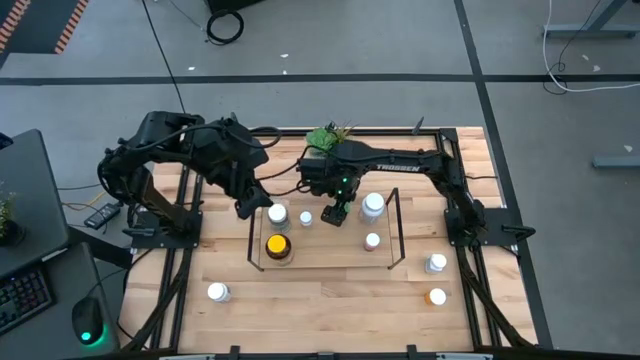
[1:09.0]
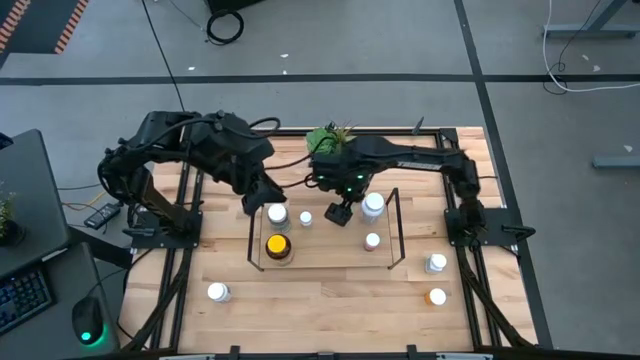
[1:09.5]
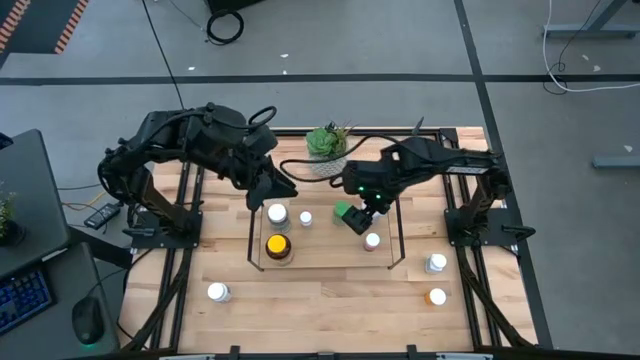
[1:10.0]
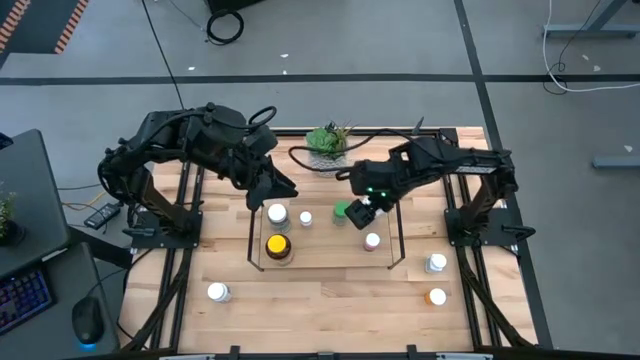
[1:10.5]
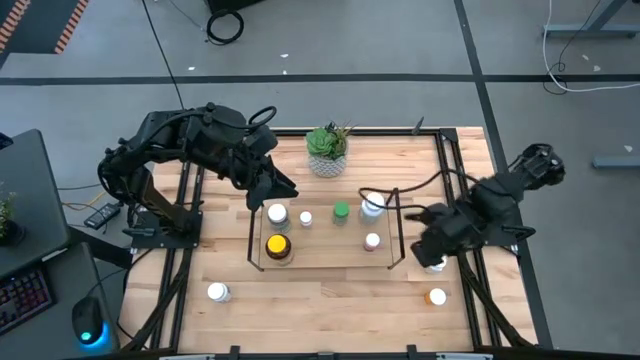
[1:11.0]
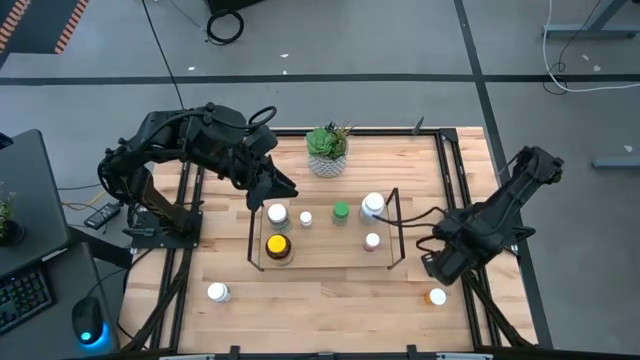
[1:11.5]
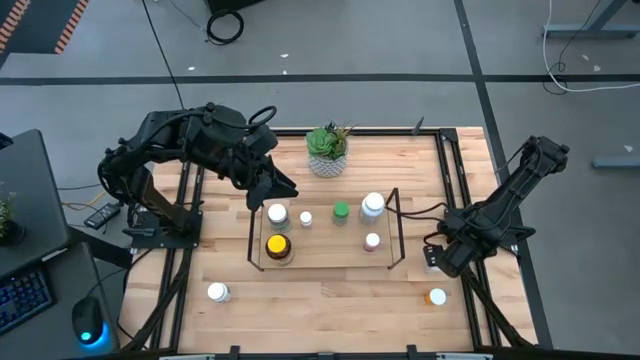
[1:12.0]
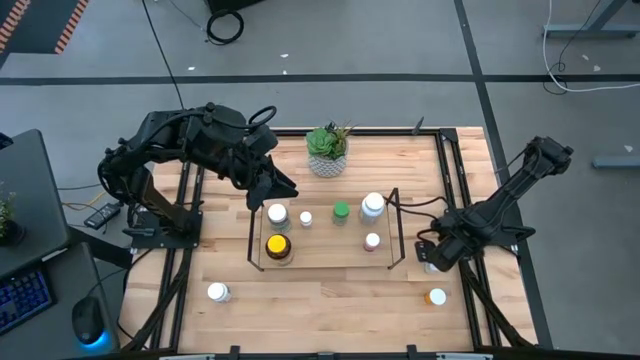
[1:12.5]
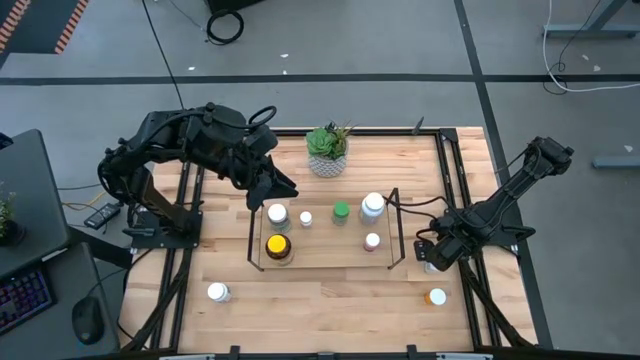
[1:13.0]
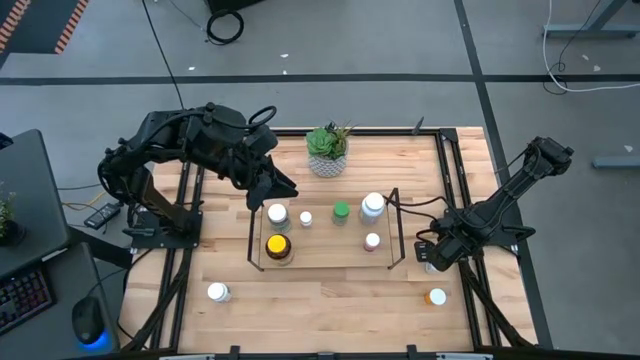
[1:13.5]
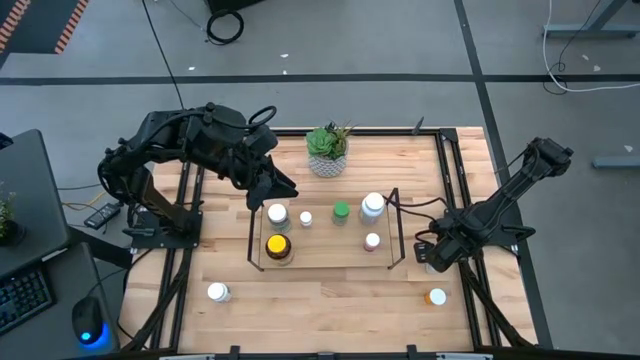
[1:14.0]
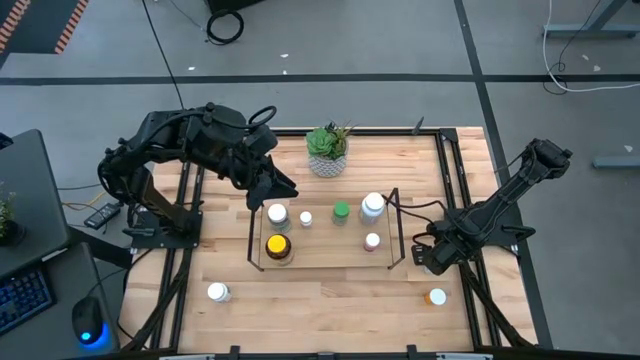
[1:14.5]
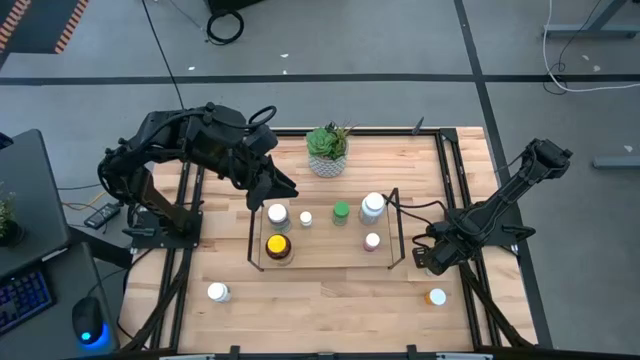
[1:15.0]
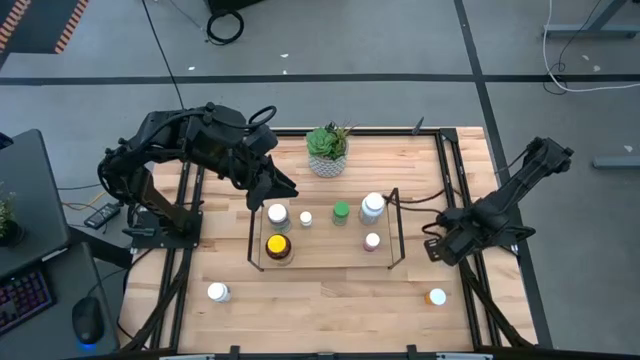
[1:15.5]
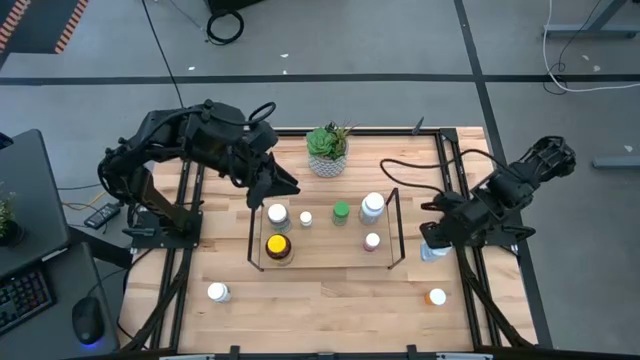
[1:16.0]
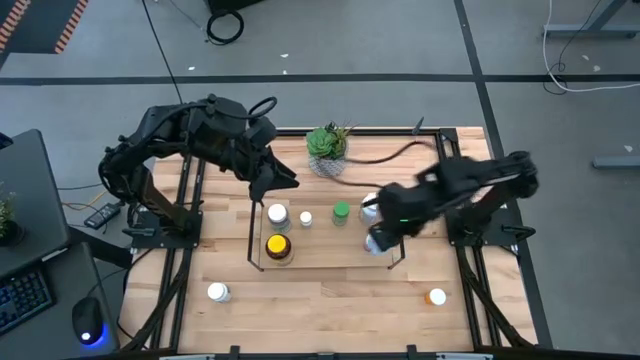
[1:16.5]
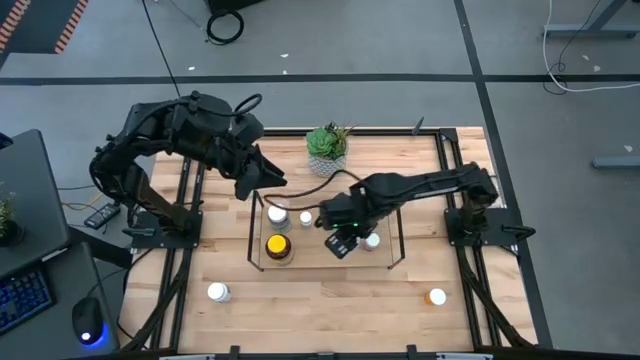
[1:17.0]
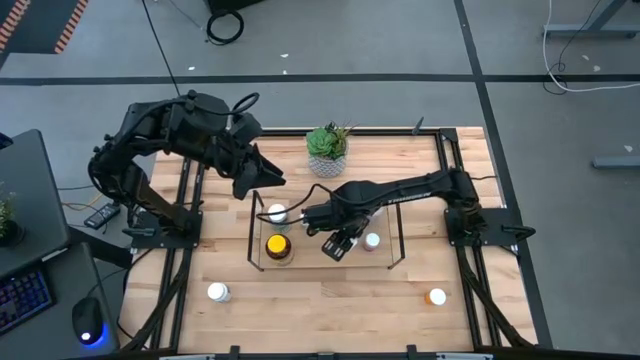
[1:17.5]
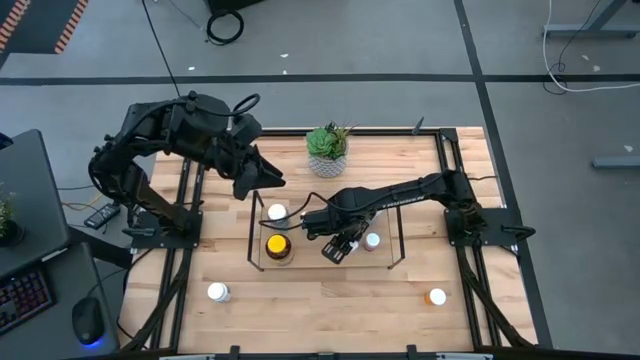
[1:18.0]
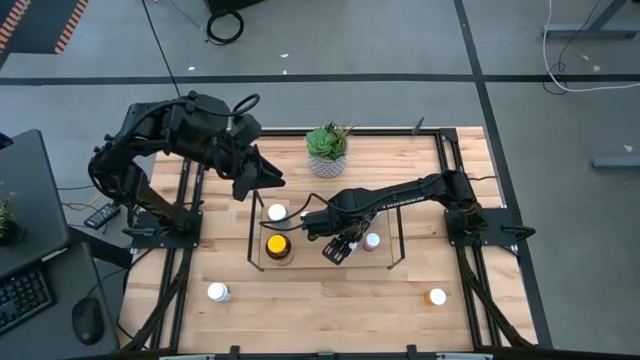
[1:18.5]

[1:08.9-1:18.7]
Task: Pick and place medicine bottles onto shelf by color
Put the small white medicine bottle on the shelf

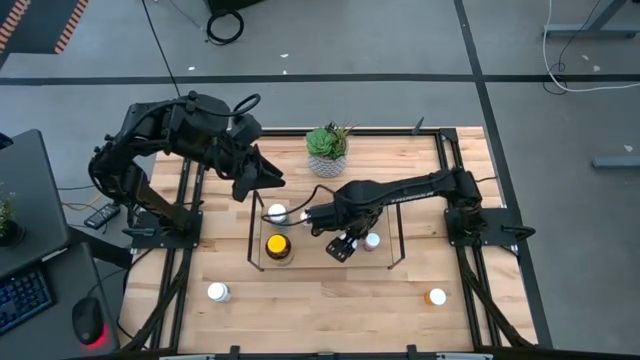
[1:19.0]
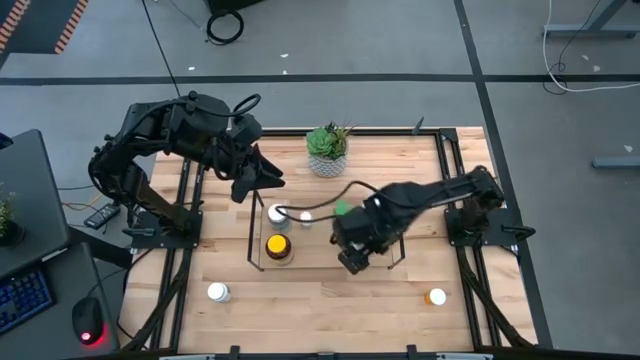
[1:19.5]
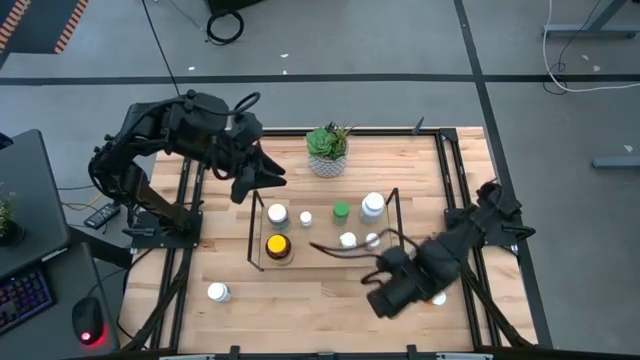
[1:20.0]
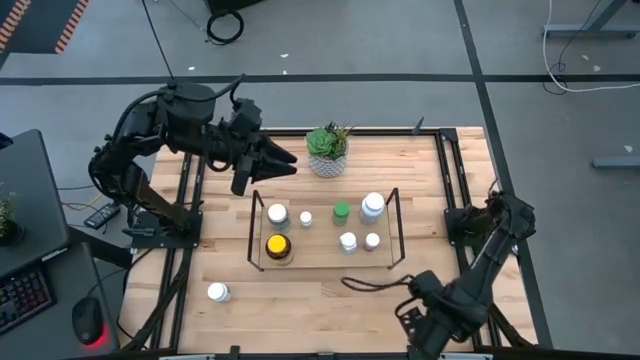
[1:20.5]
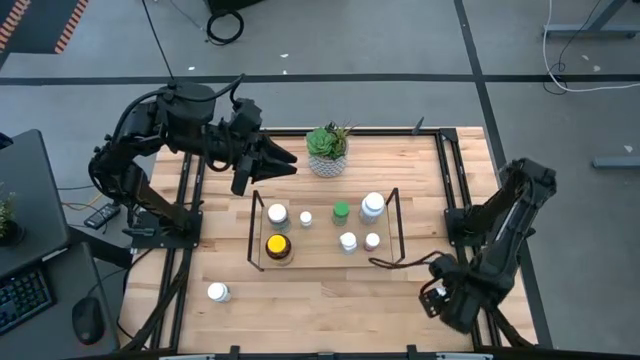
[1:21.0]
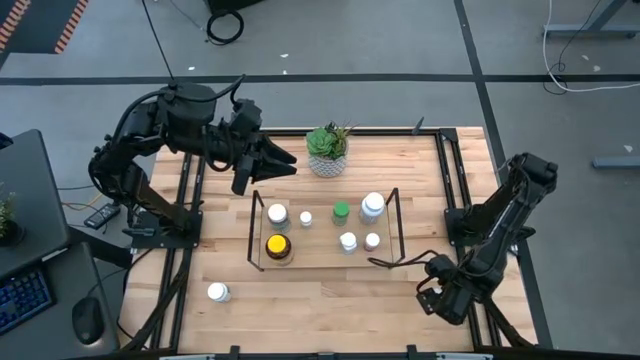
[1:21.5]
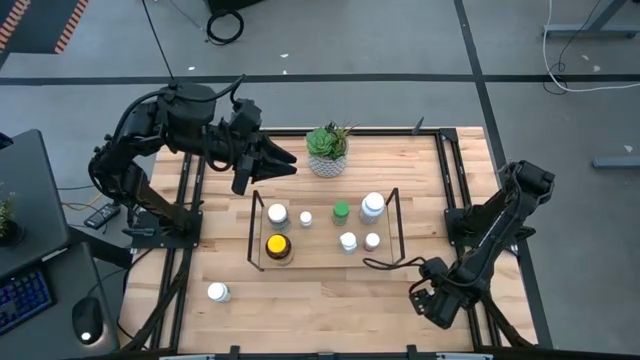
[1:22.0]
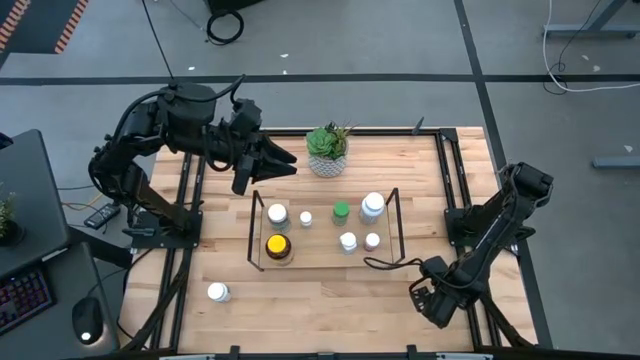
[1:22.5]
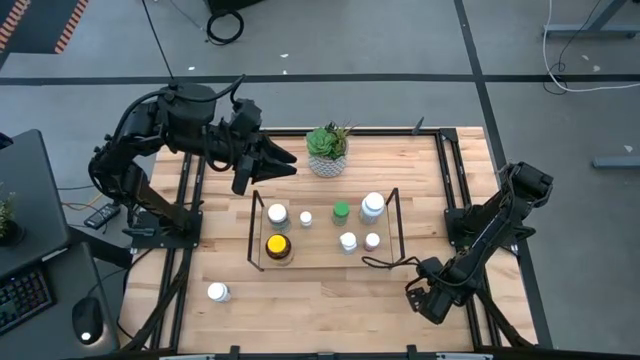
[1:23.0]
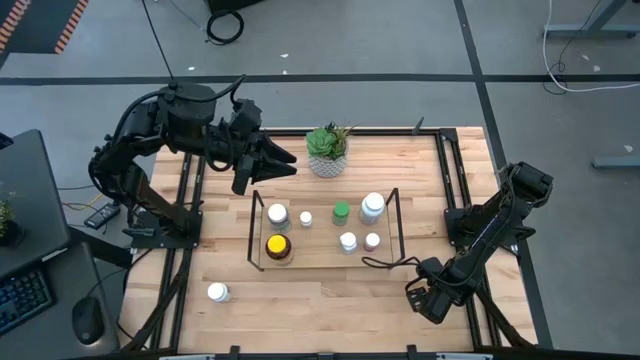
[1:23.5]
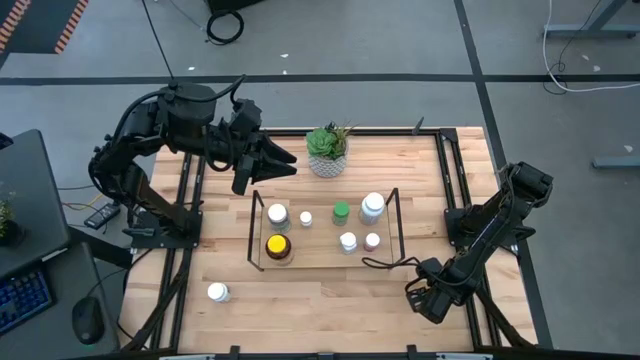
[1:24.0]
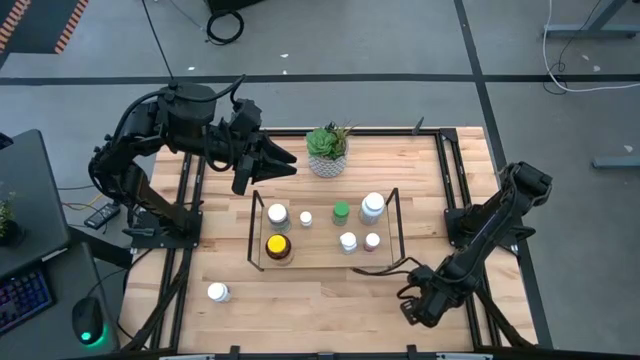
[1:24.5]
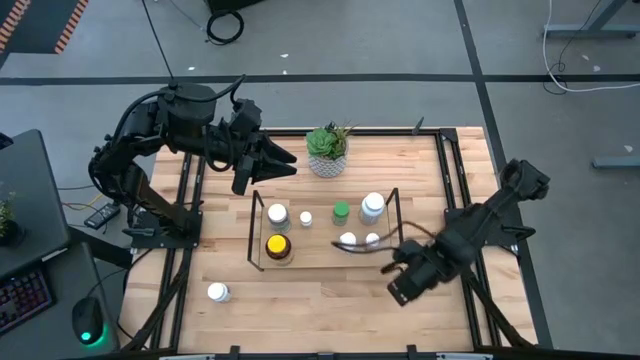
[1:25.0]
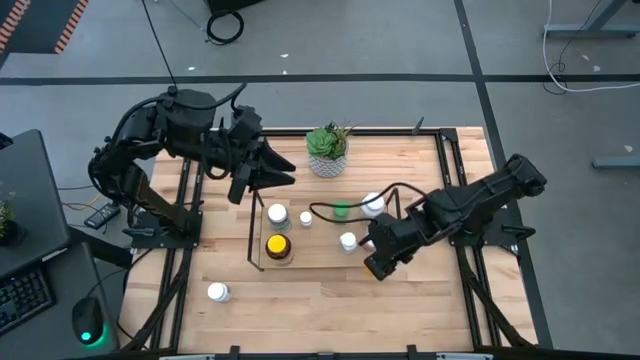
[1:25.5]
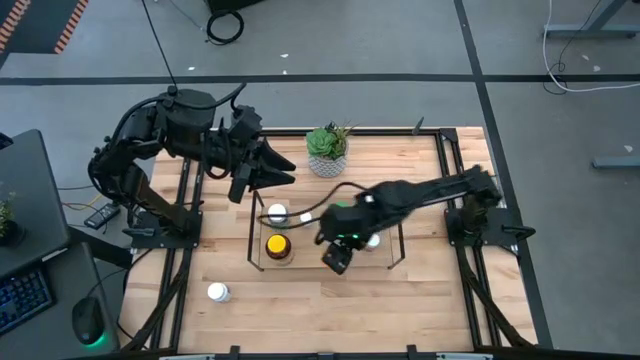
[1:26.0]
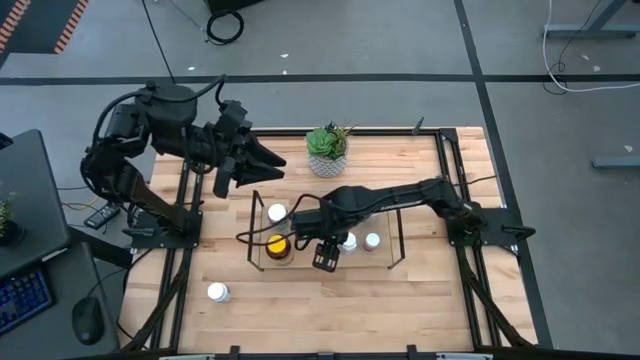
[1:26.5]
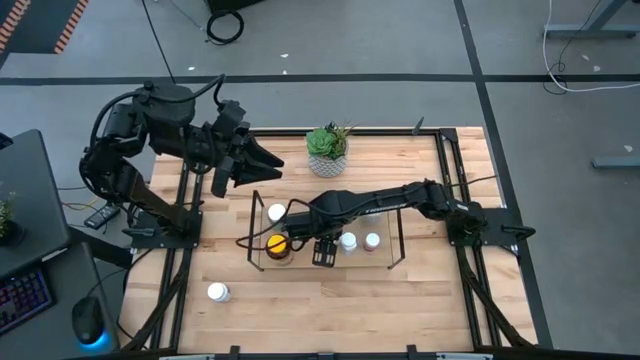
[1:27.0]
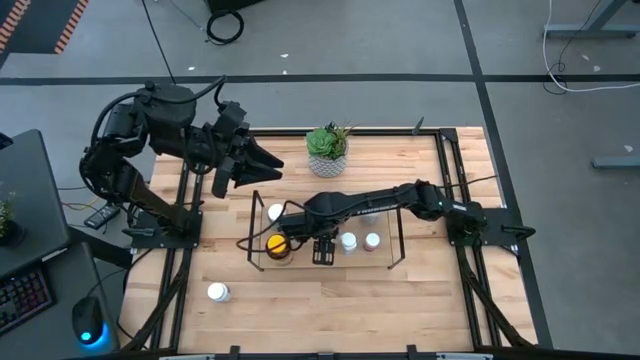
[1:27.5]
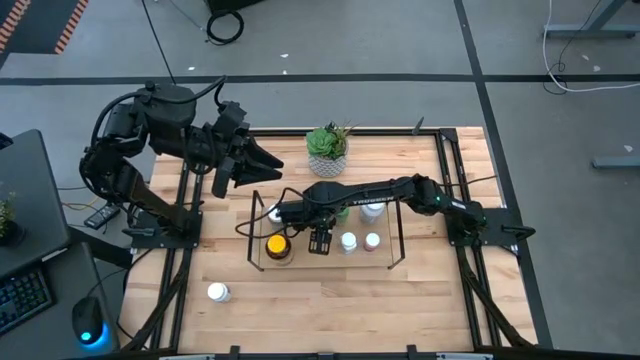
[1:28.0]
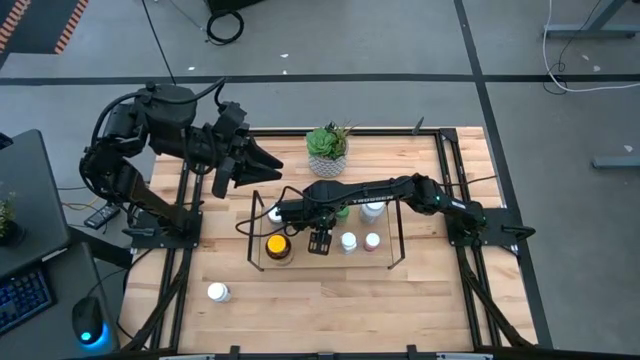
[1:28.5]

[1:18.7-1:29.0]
Put the orange medicine bottle on the shelf

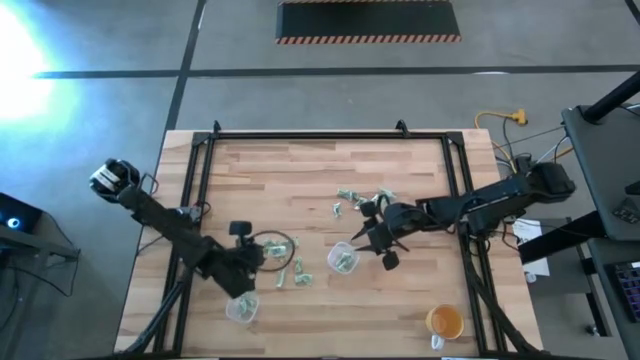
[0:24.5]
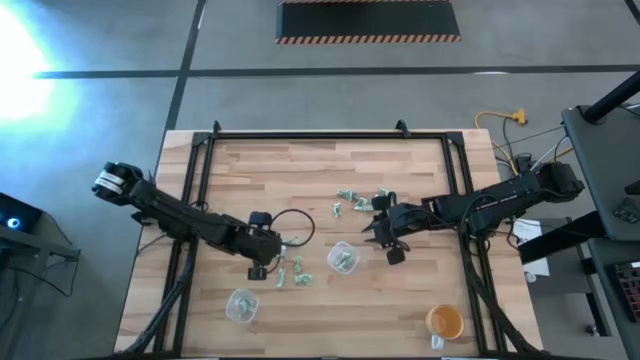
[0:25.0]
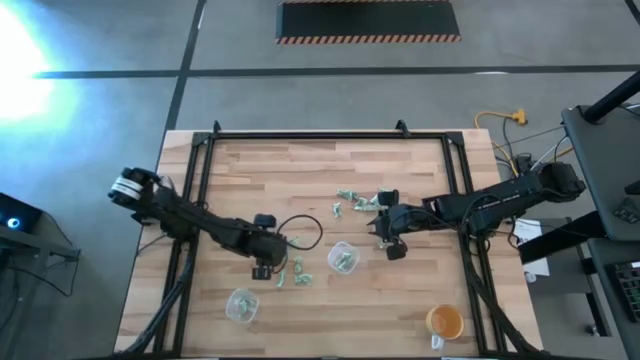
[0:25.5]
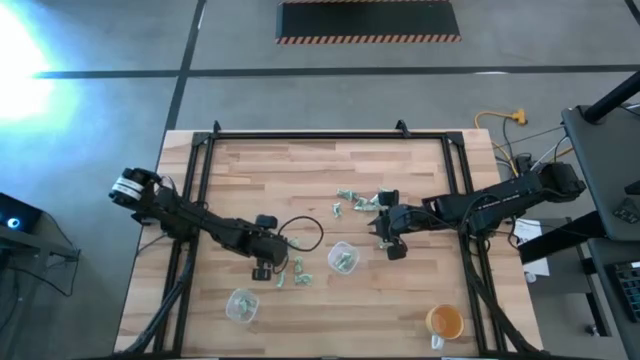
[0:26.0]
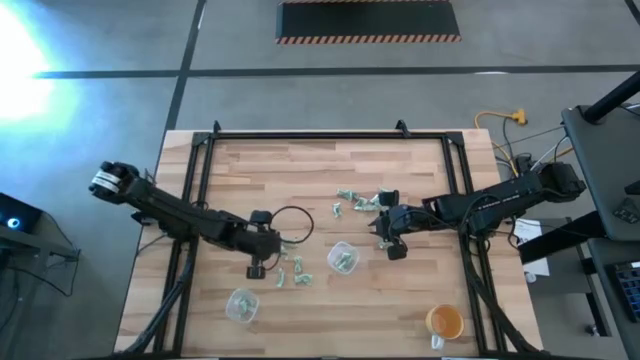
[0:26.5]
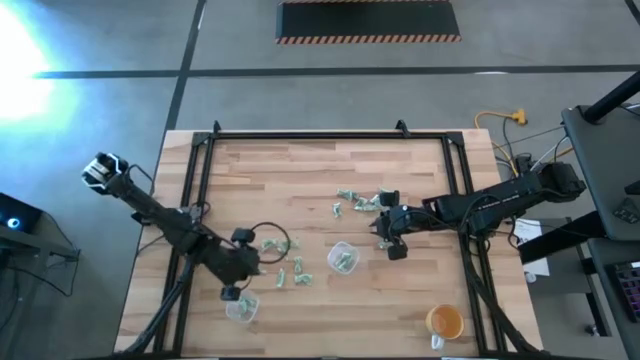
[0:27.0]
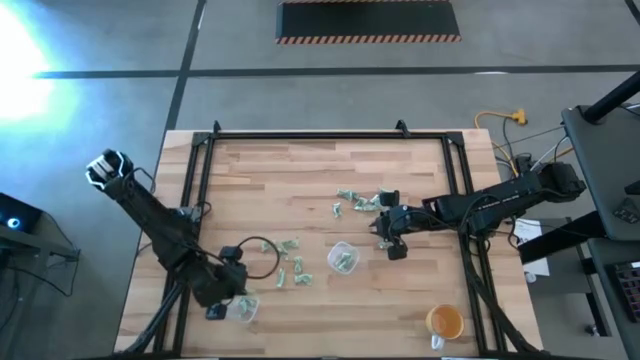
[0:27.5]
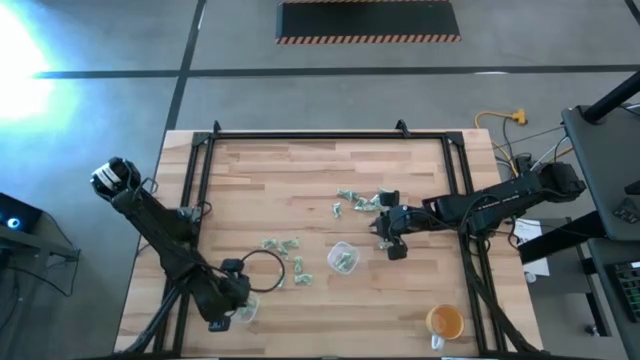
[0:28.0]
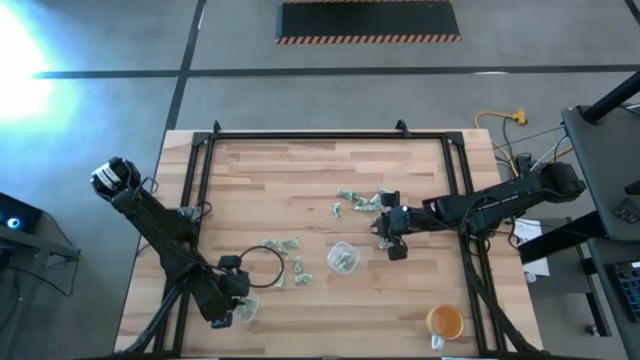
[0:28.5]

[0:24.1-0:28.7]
Task: Pick and place items into bin
Put the light green packet into the bottom transparent bin
